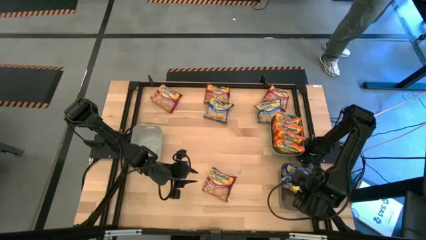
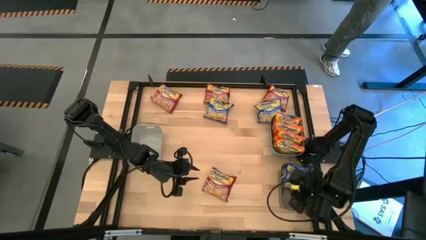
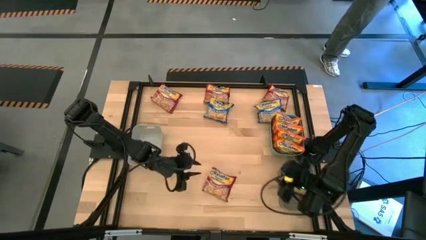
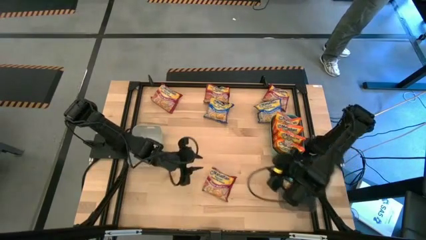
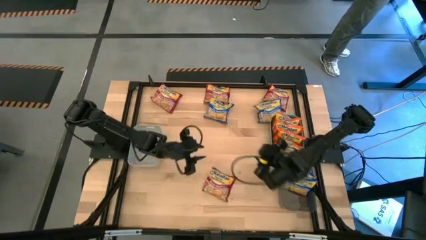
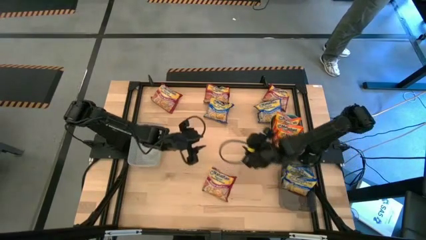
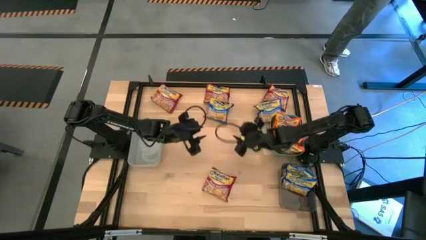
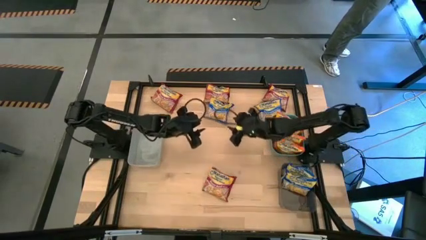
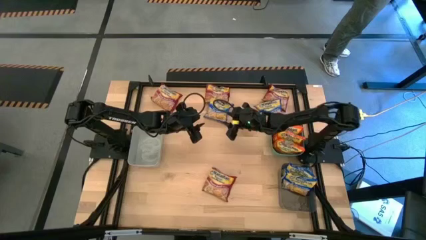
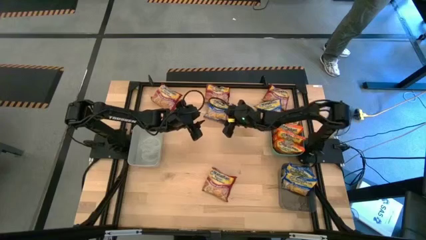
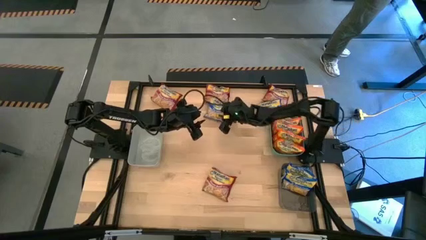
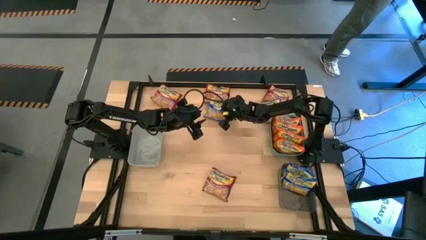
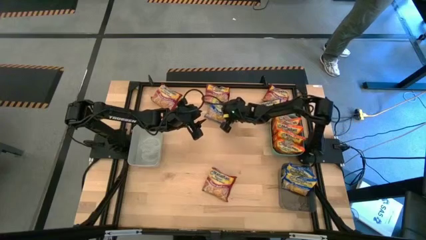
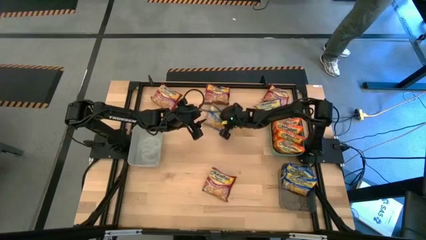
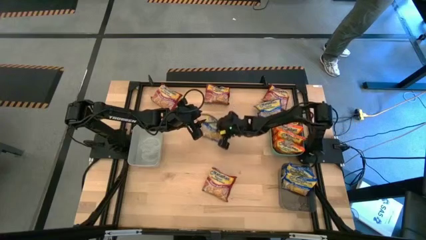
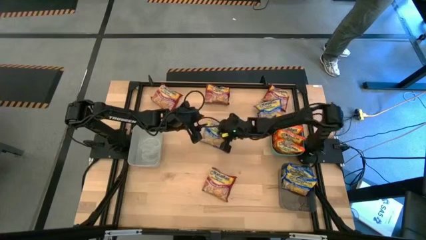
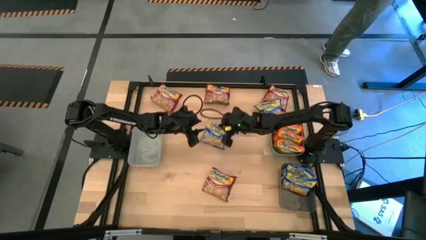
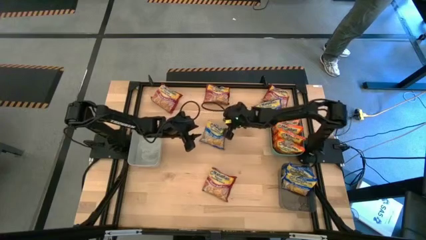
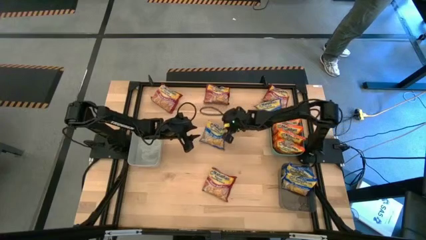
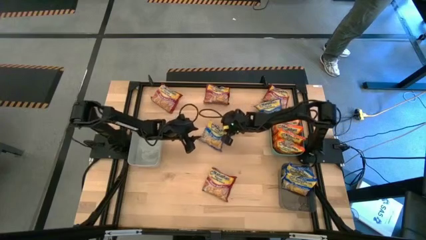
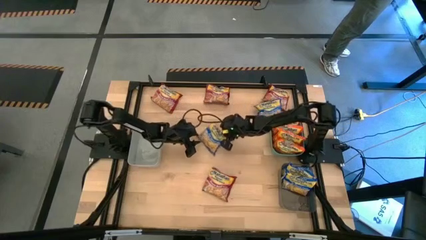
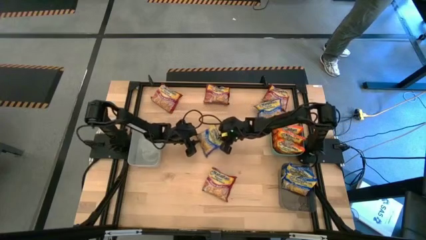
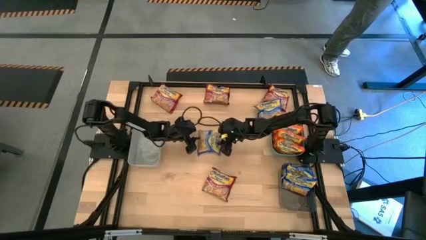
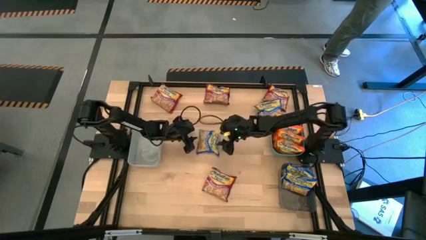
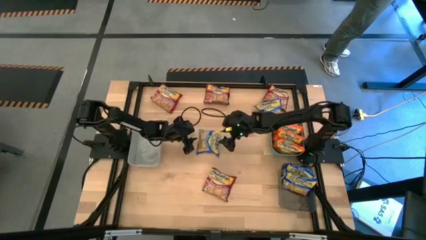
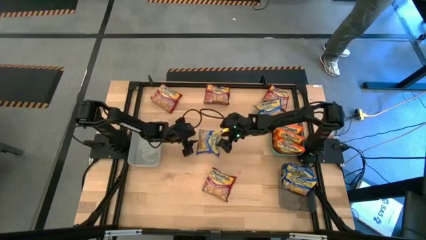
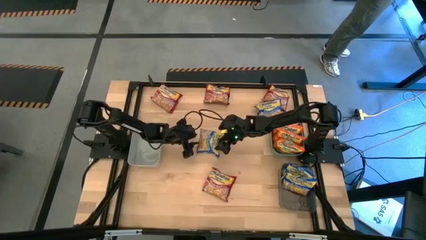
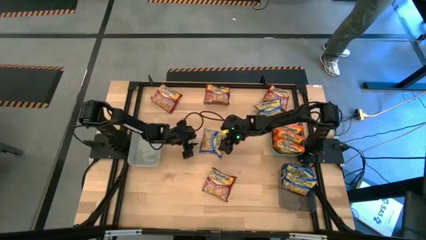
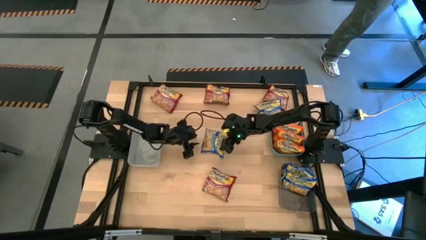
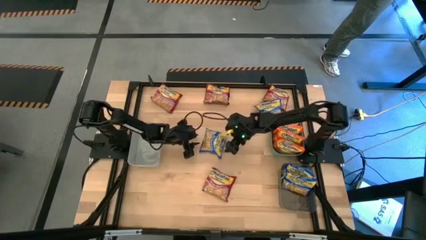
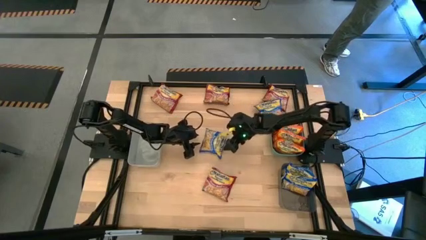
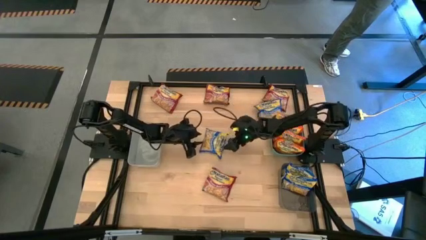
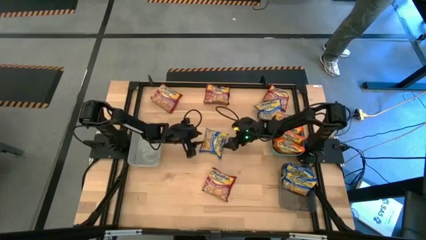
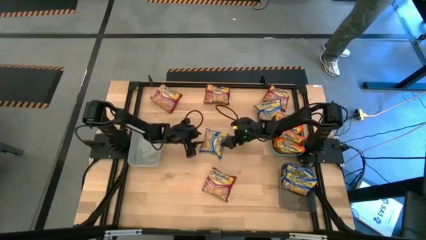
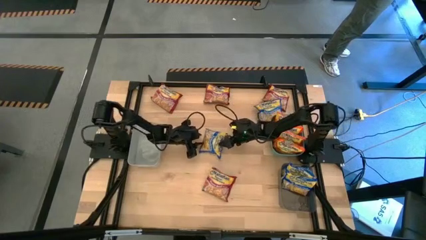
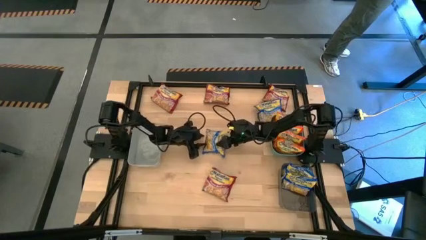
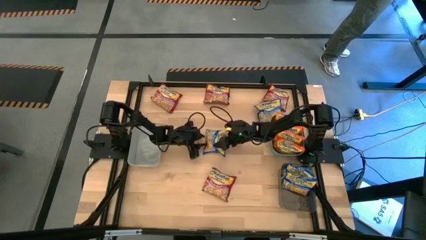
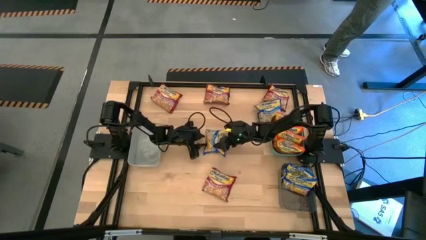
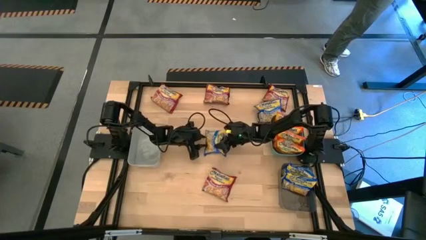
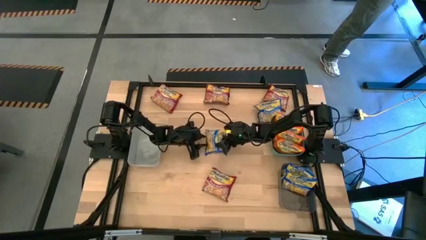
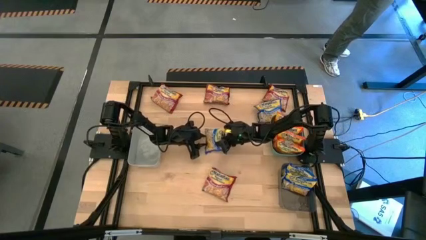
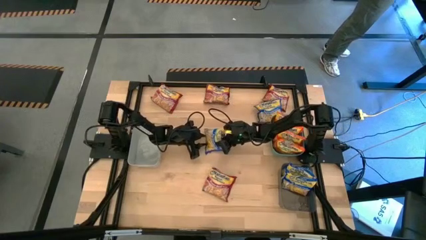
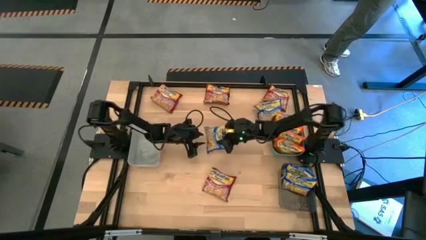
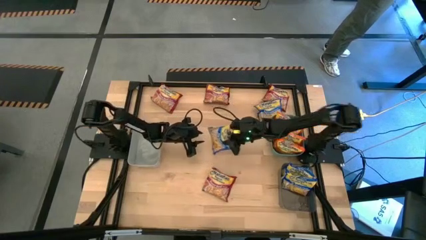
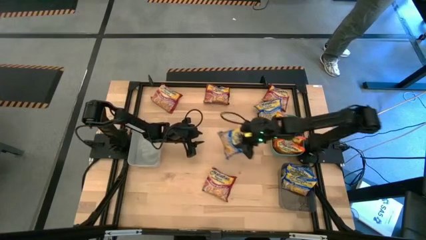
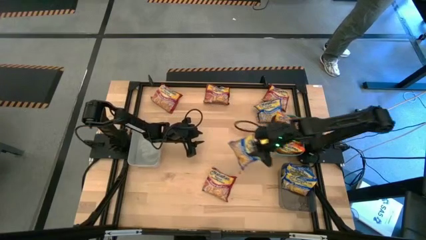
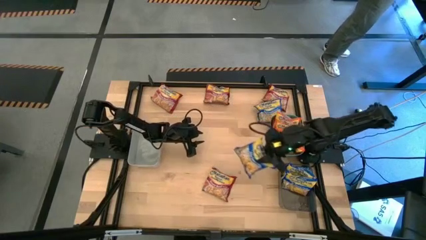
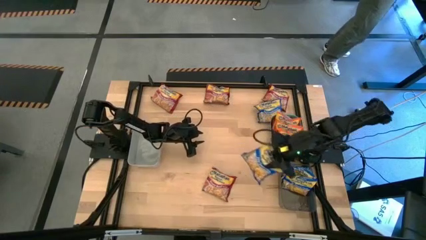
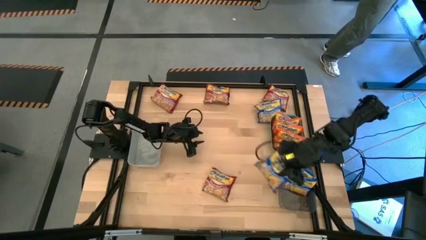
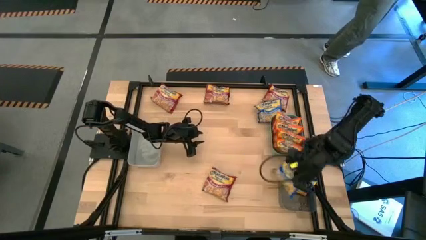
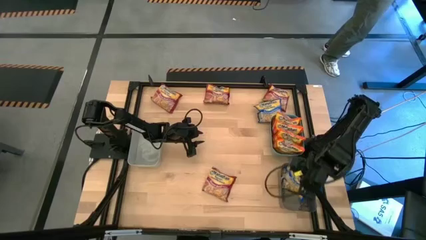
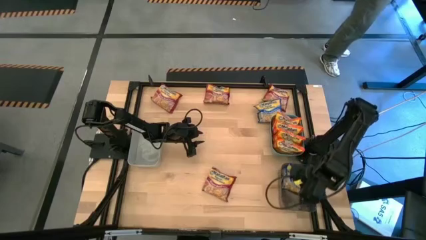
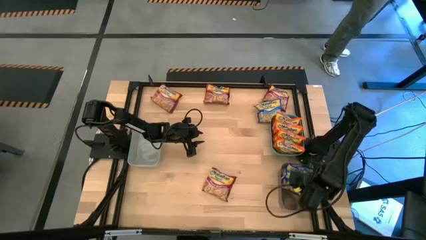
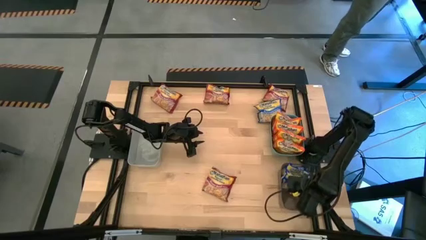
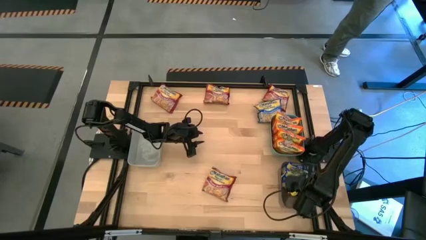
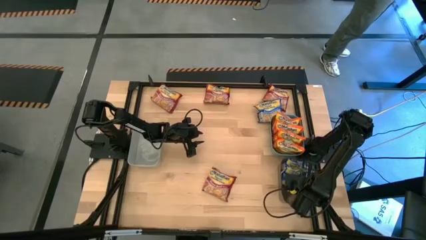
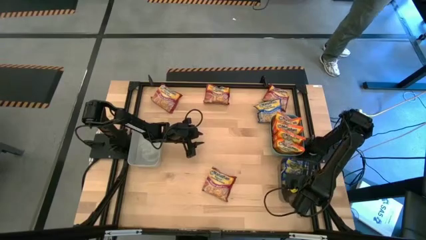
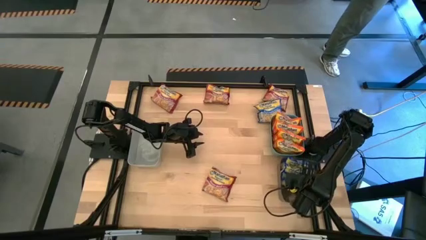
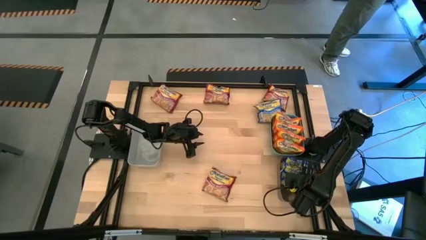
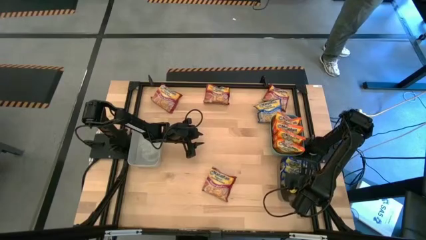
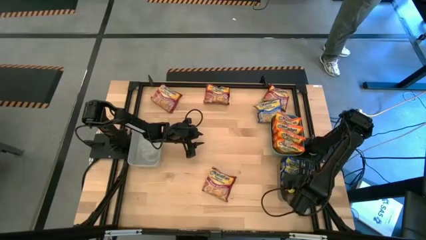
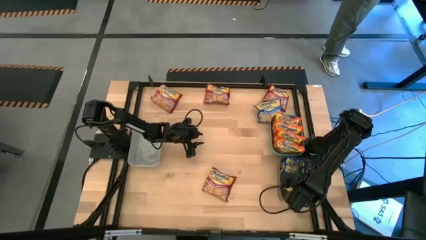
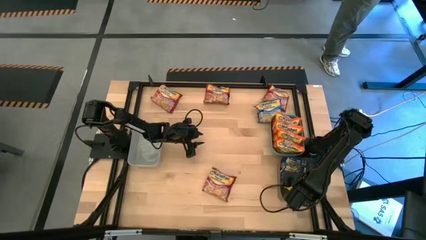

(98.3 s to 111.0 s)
Task: Sort Maruchan noodles
Put the blue noodle pack into the black bin

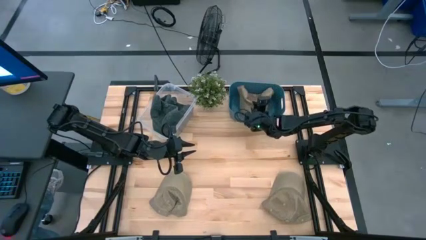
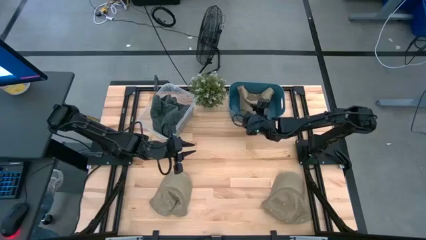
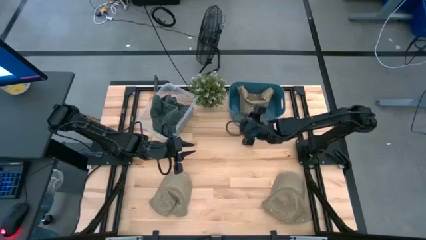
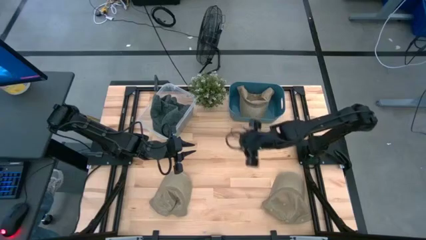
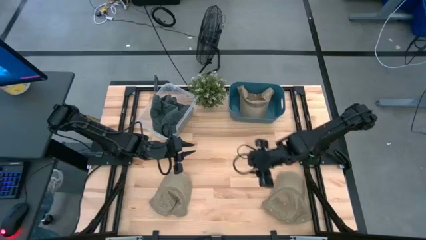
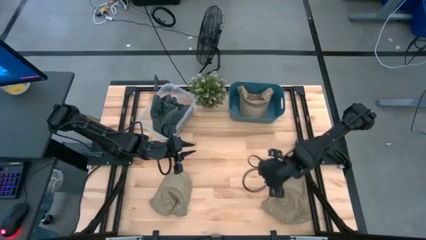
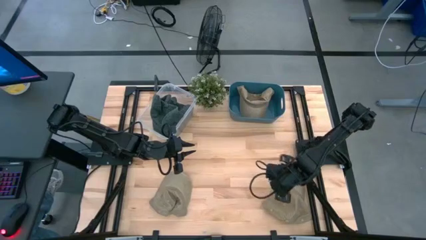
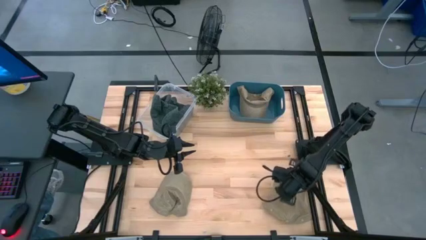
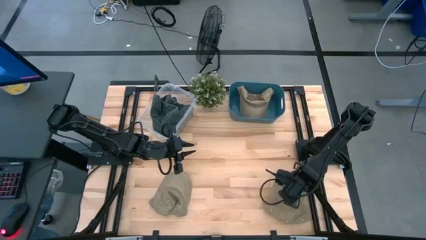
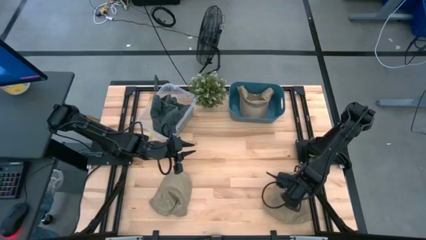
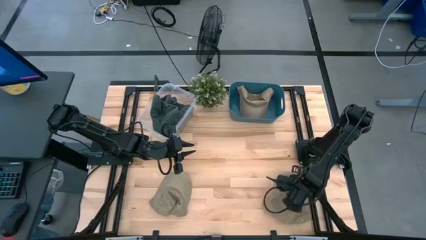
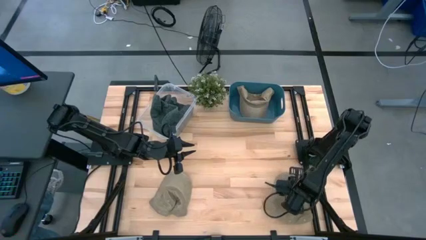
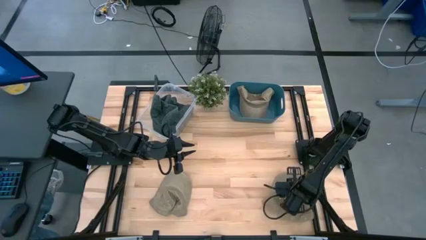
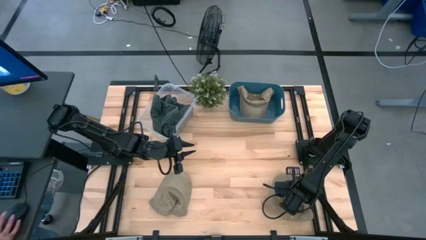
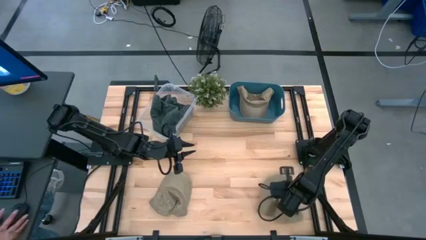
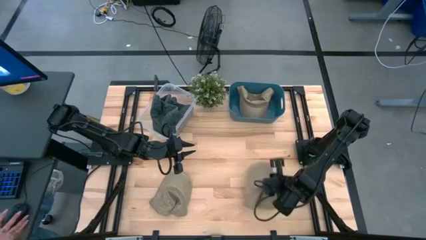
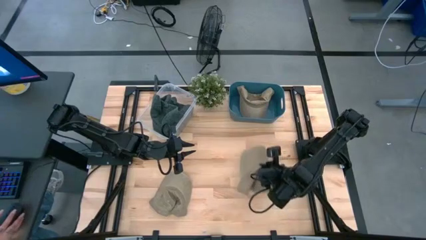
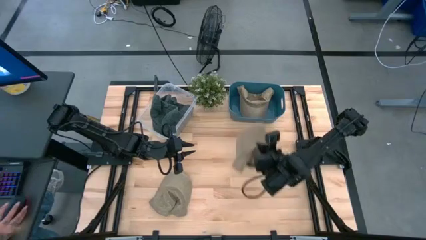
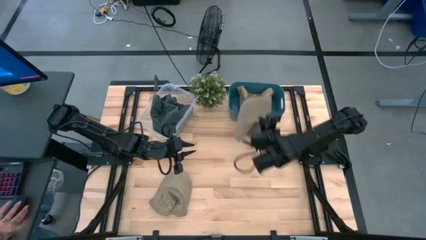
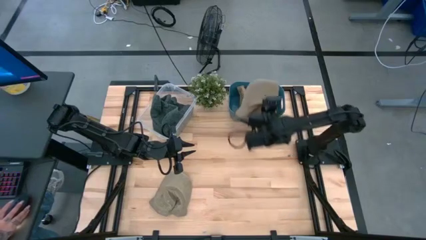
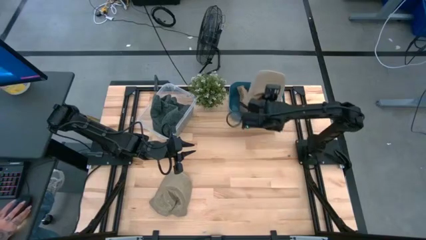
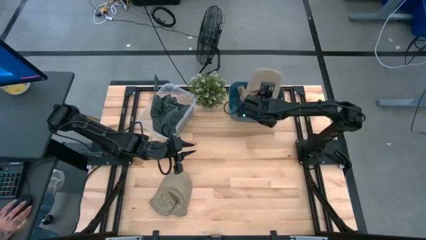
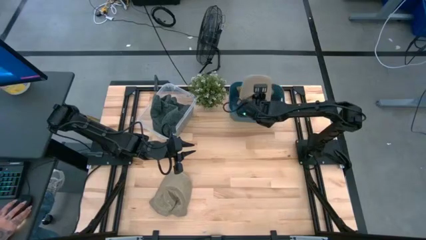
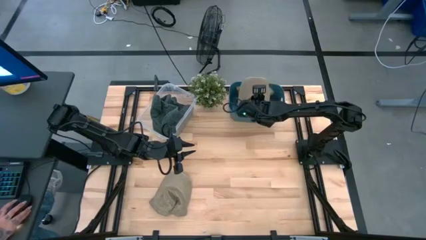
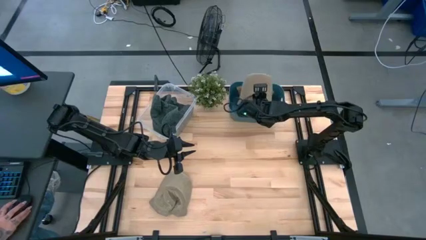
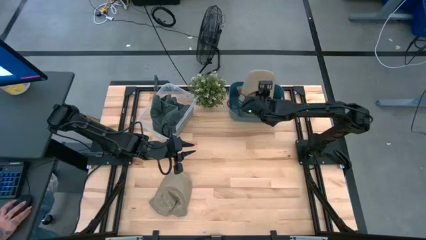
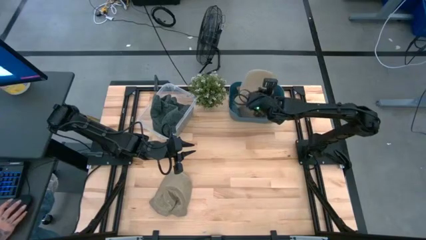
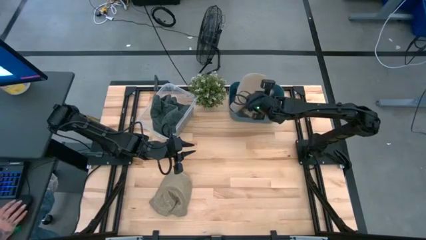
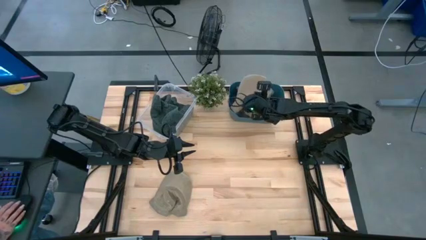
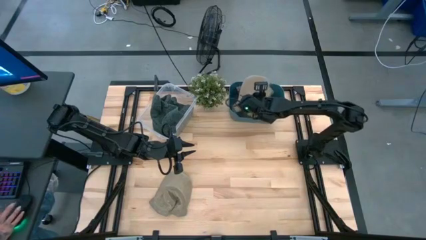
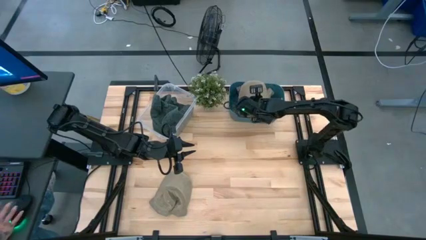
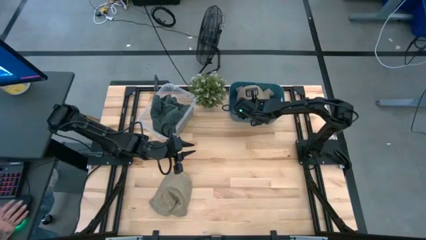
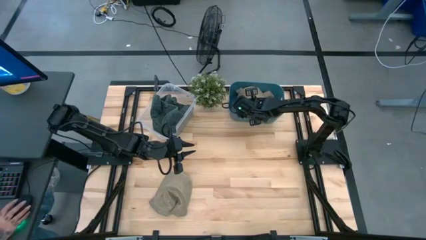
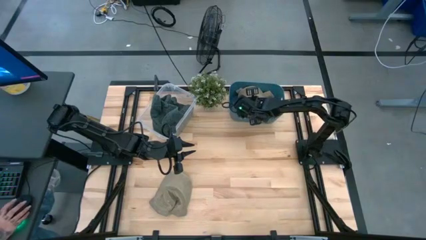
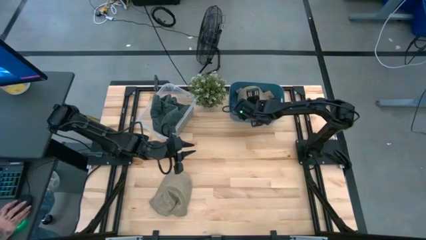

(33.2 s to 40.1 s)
Task: Pick & Place hat
Put the right brown cap into the blue bin
